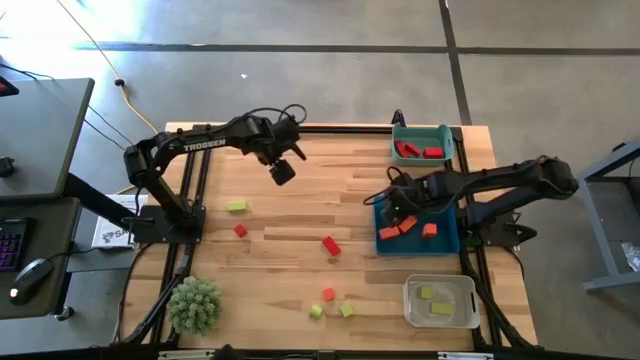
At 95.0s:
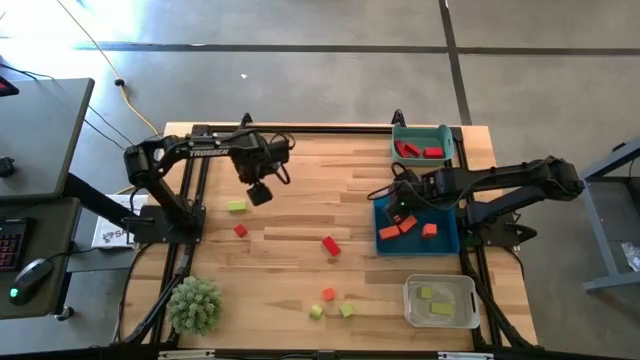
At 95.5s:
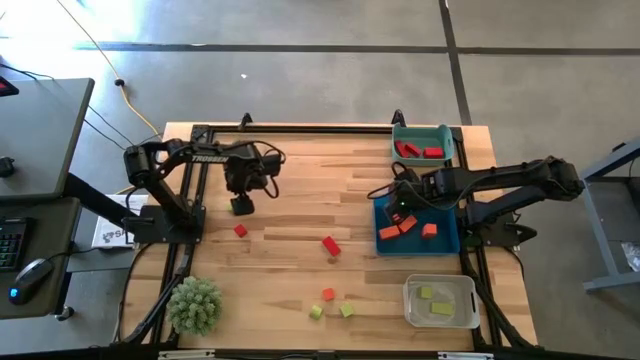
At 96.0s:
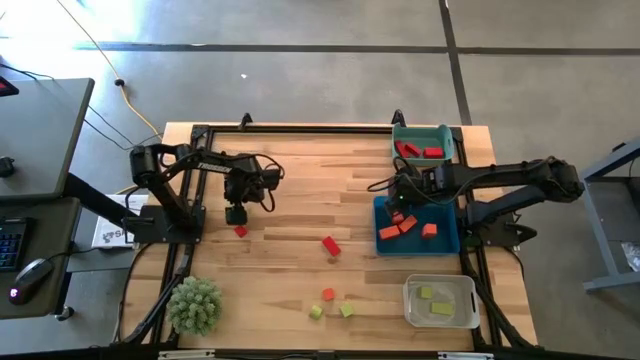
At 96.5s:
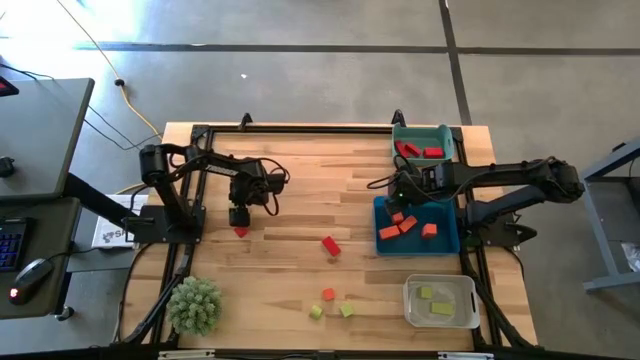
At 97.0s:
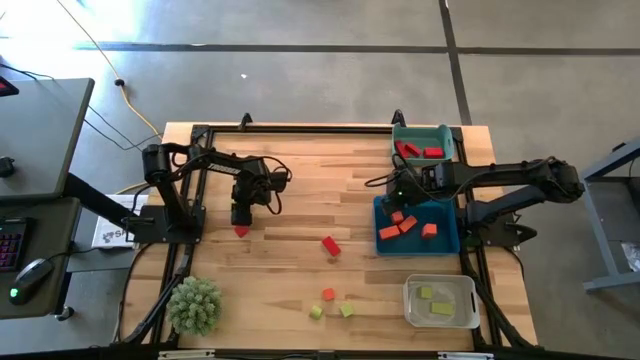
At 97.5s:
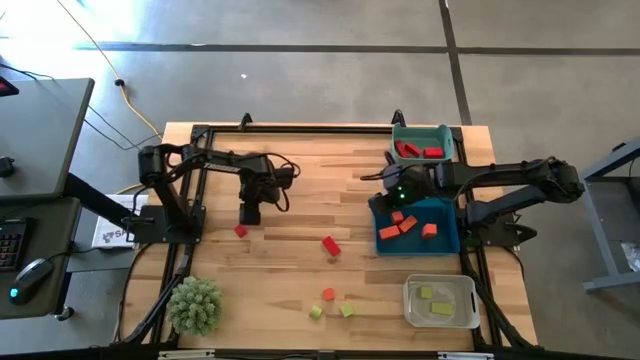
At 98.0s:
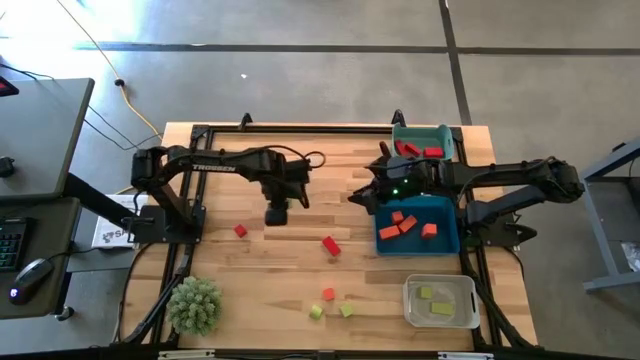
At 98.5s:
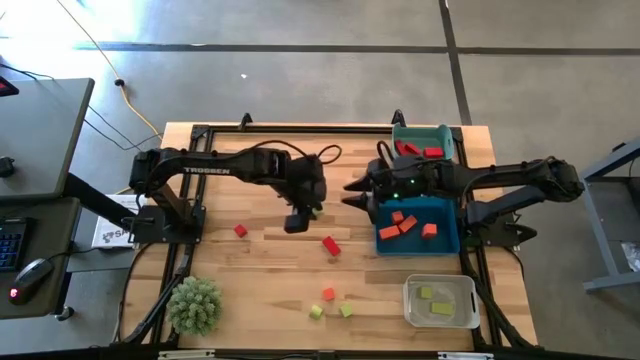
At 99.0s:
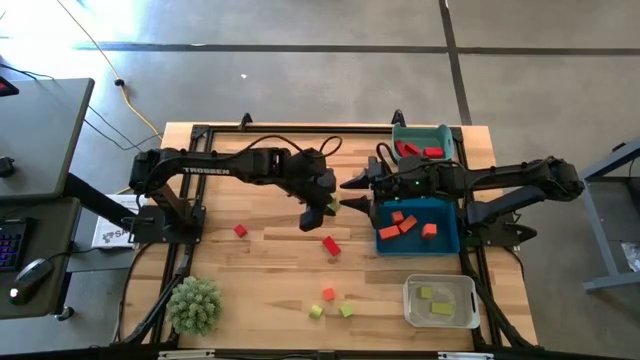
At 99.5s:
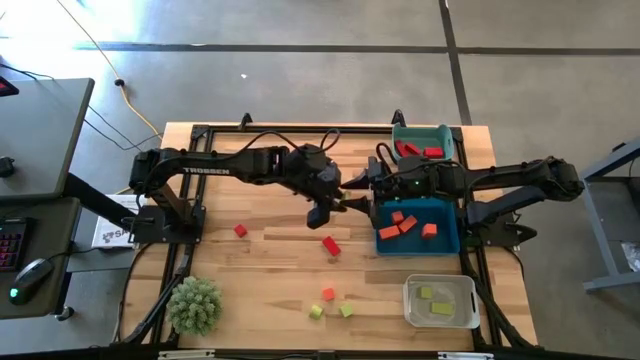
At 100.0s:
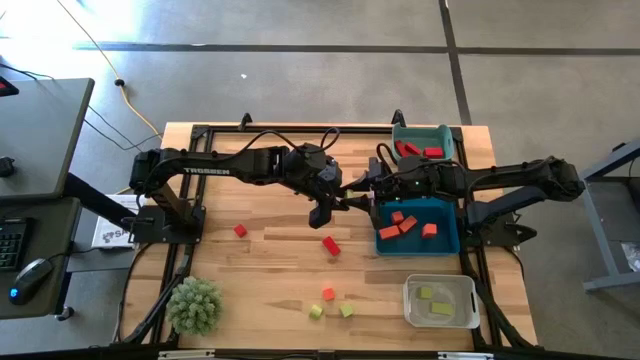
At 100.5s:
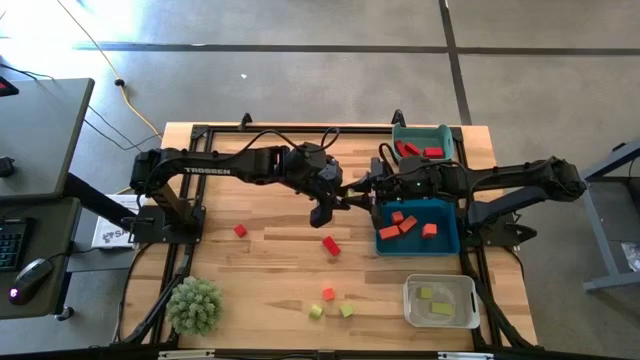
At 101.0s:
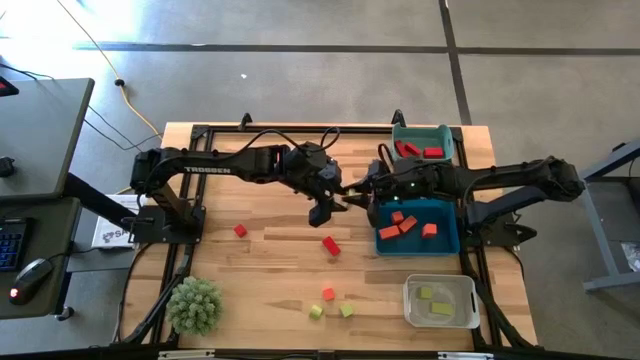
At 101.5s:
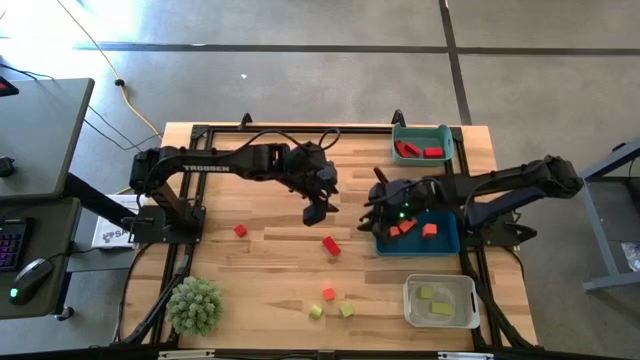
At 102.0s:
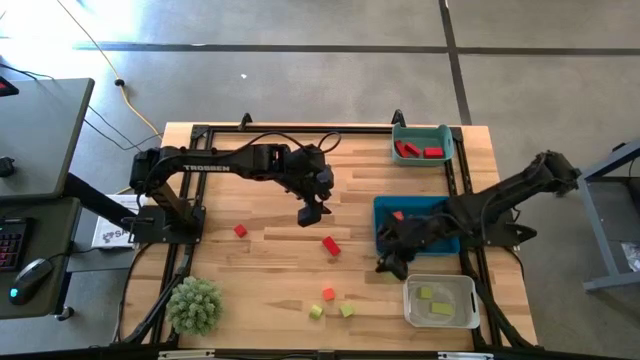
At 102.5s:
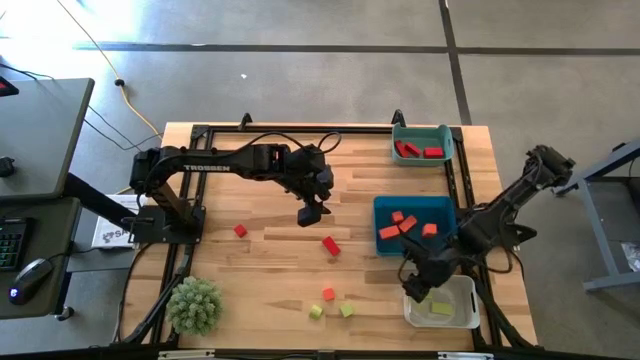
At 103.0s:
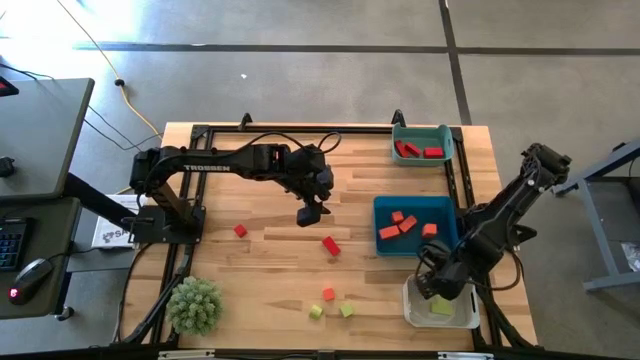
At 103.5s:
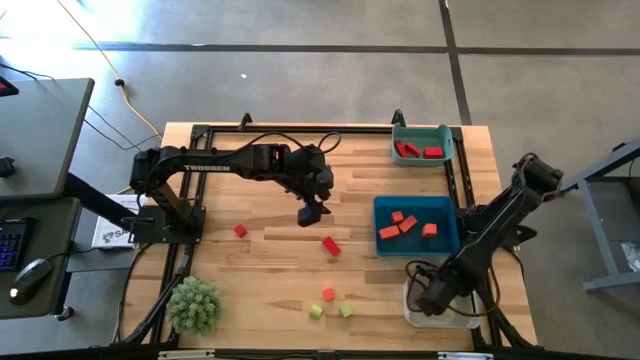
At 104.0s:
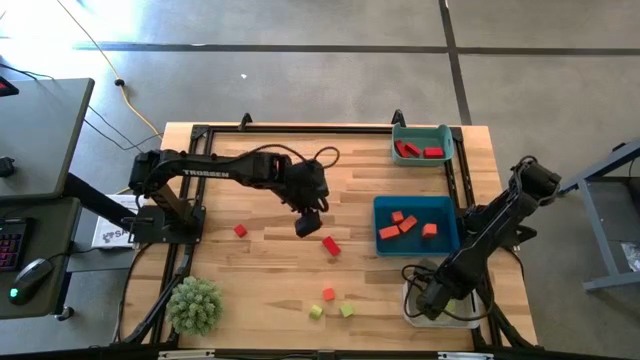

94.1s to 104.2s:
Task: Sort & place blocks by color
Put the green wooden block into the white bin

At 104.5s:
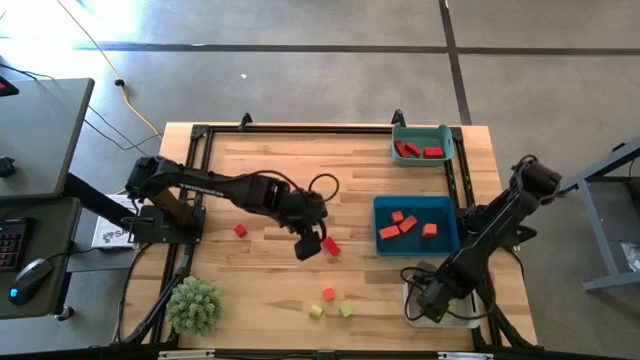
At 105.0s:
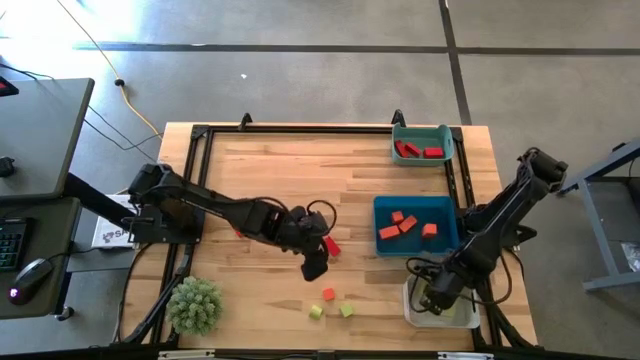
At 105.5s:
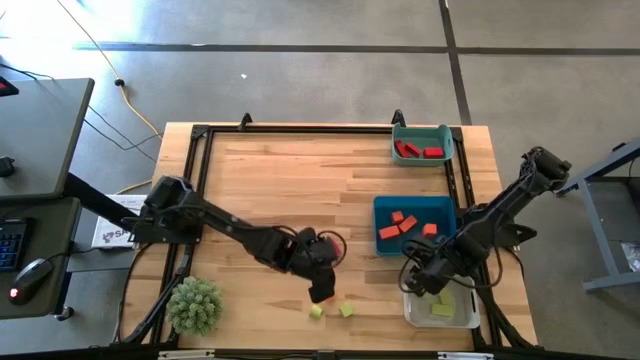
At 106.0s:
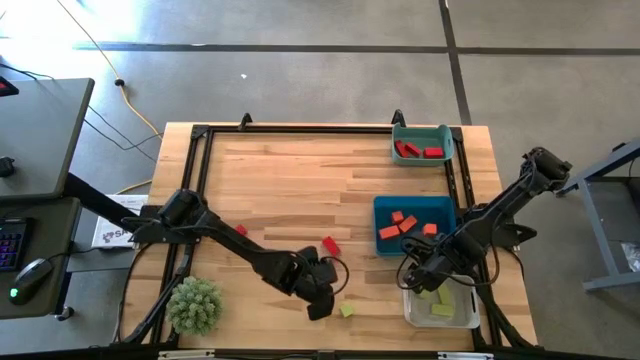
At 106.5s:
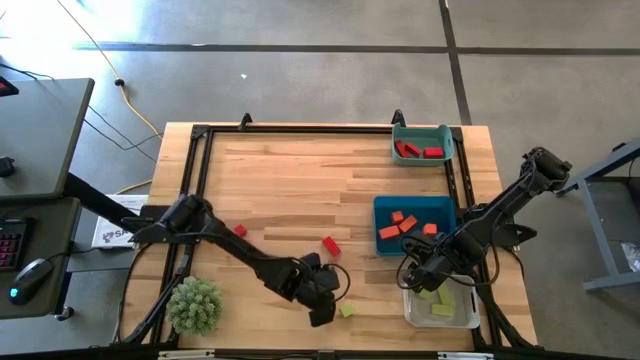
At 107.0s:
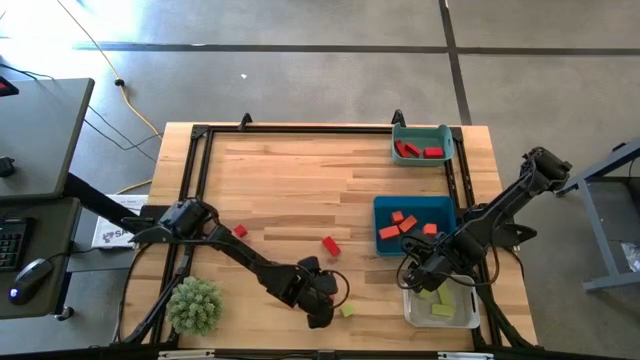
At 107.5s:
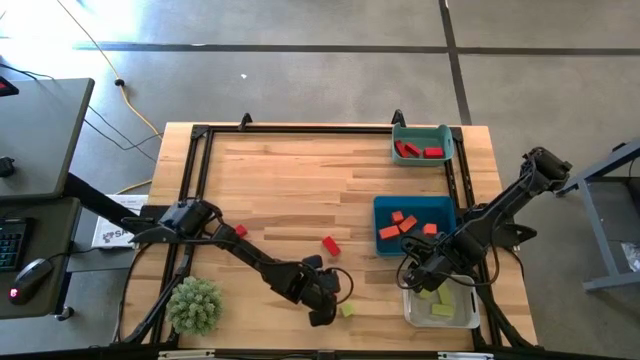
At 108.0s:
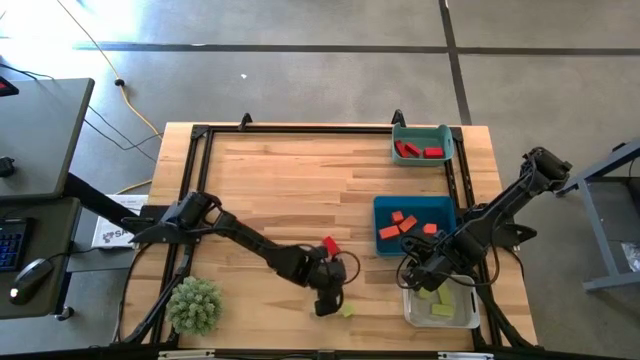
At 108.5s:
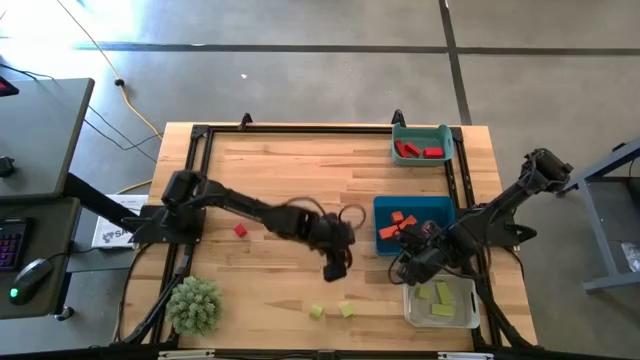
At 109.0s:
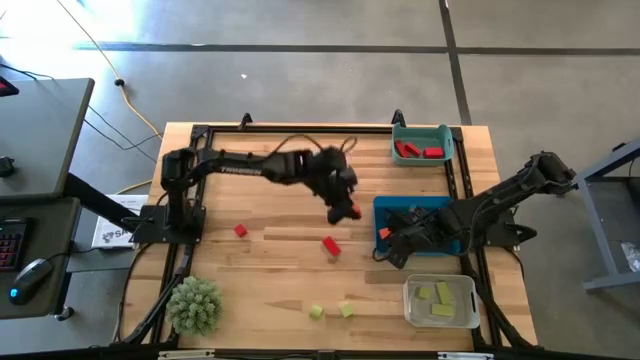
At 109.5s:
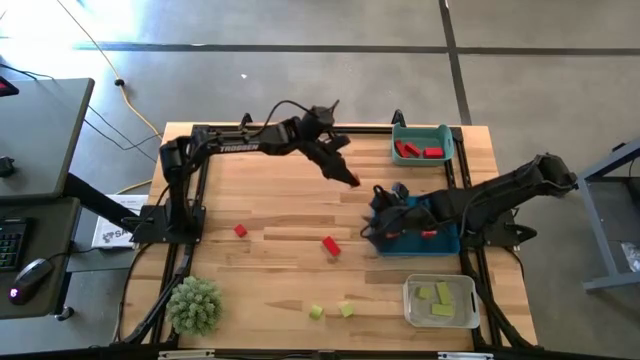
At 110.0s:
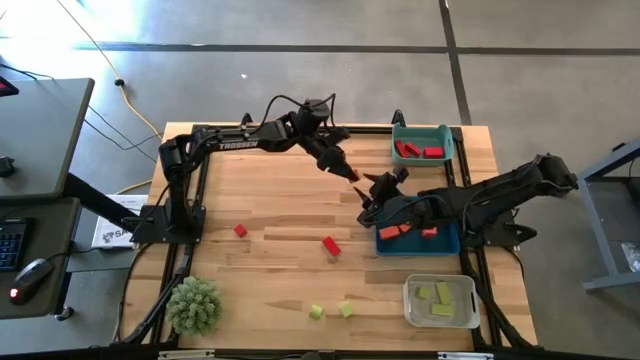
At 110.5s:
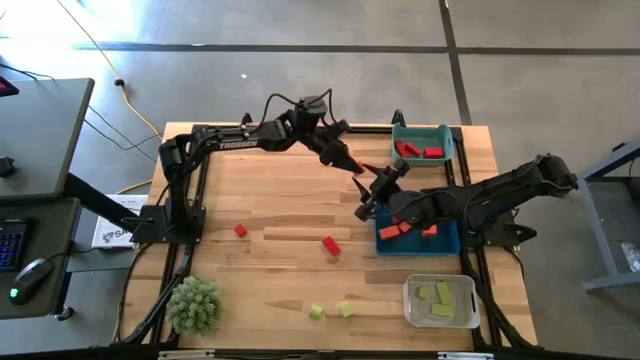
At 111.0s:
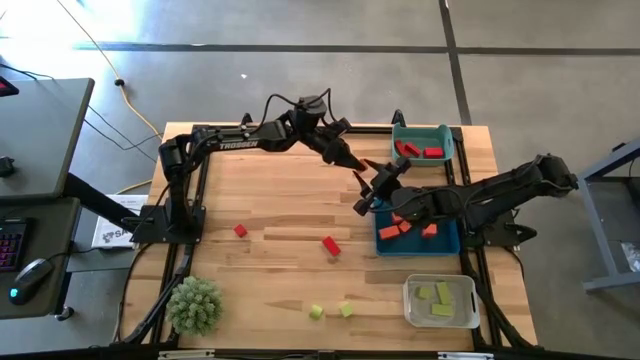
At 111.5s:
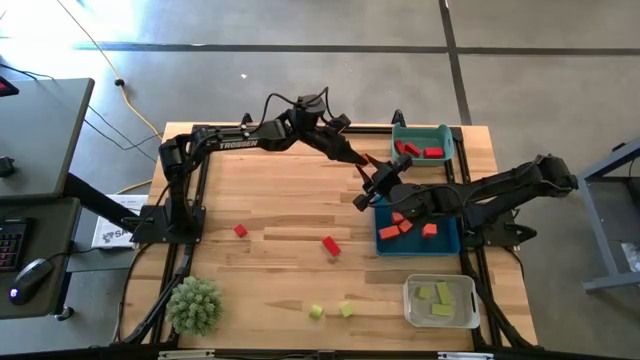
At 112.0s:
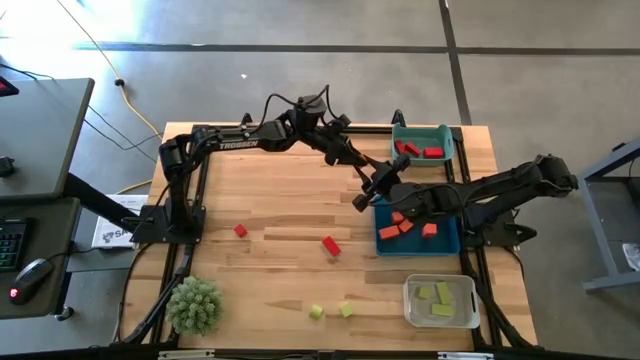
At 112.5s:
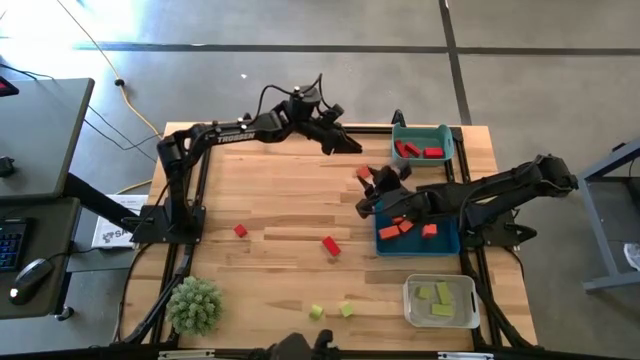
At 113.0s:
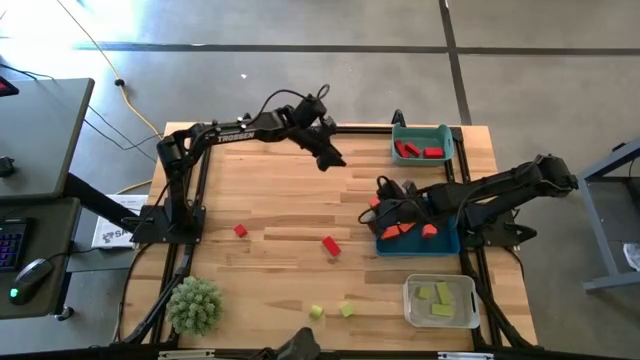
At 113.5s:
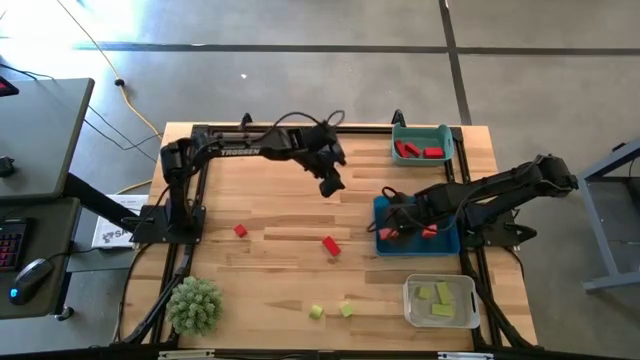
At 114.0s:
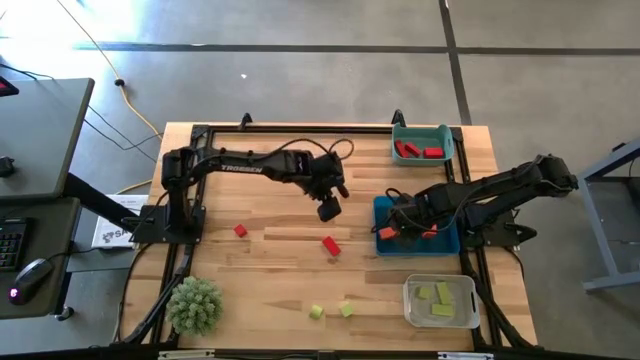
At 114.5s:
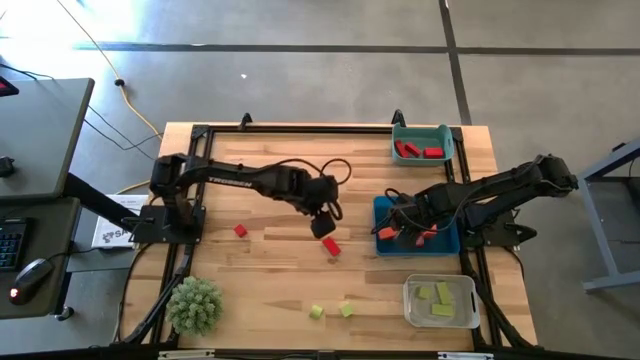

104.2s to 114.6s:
Put the orange wooden block into the blue bin
